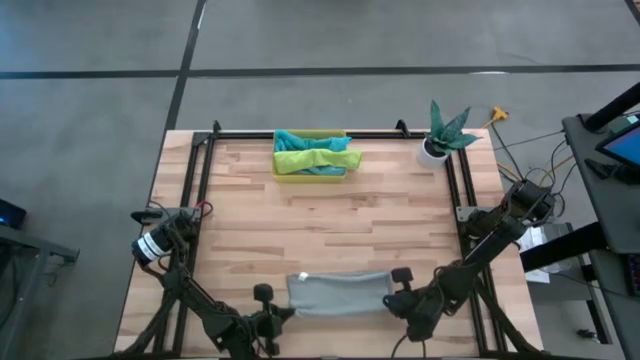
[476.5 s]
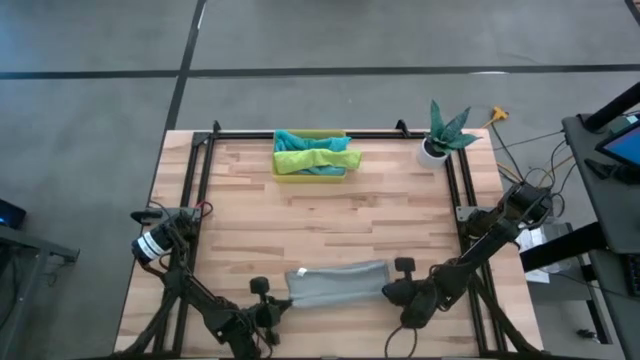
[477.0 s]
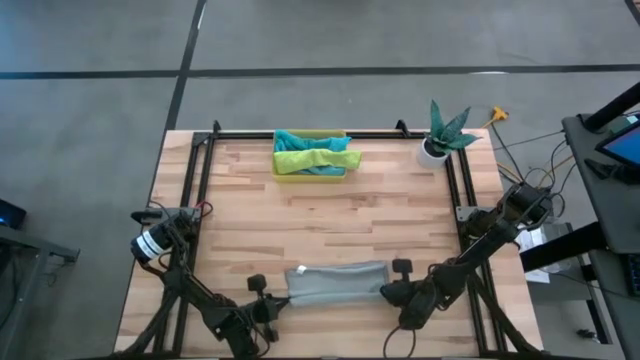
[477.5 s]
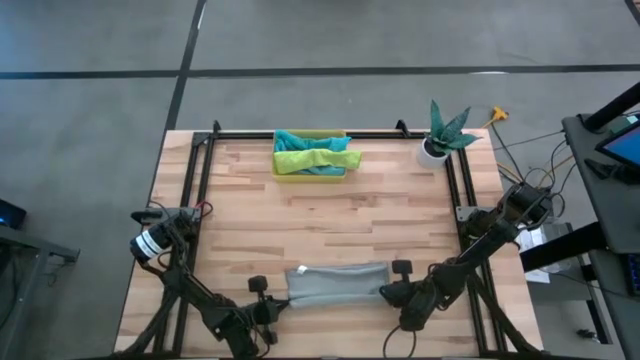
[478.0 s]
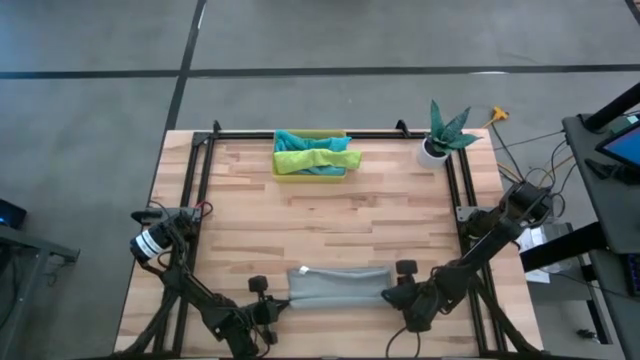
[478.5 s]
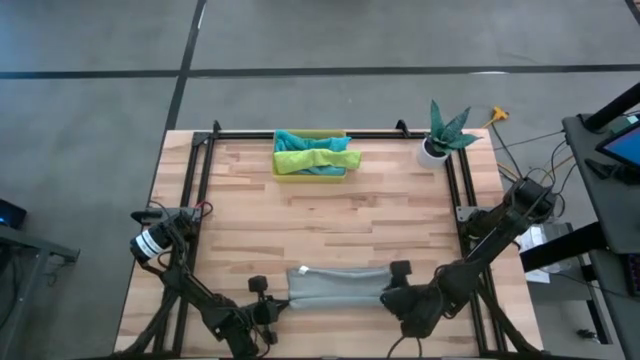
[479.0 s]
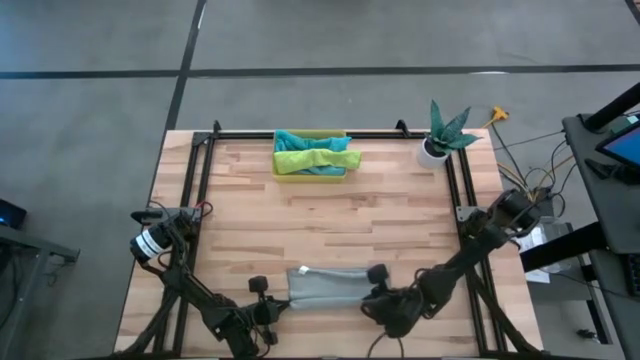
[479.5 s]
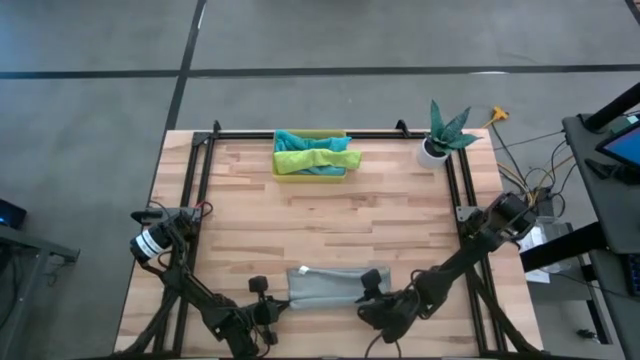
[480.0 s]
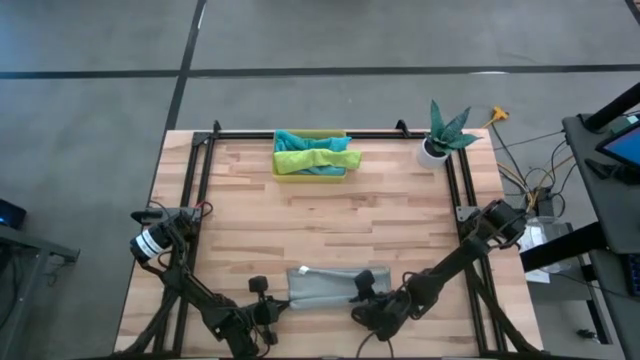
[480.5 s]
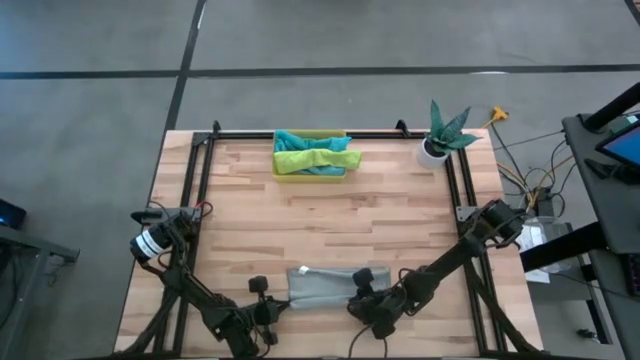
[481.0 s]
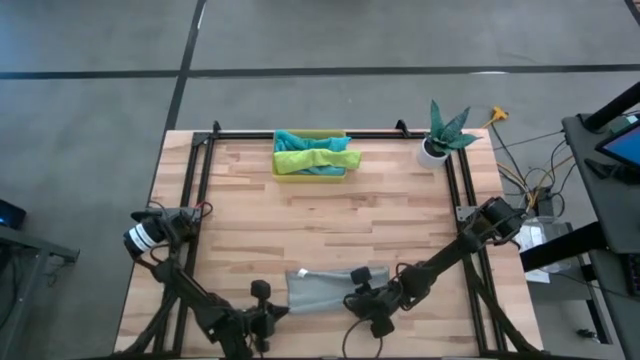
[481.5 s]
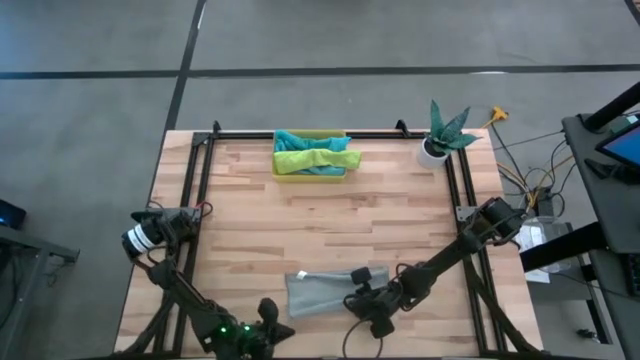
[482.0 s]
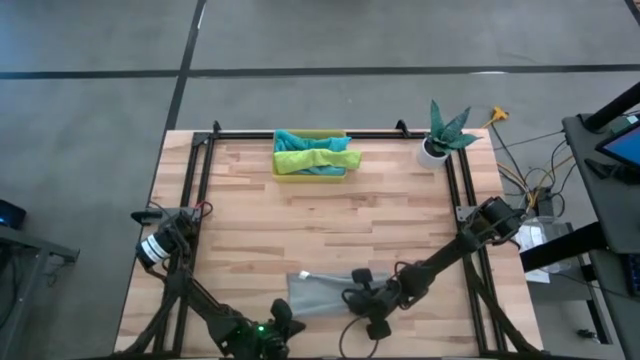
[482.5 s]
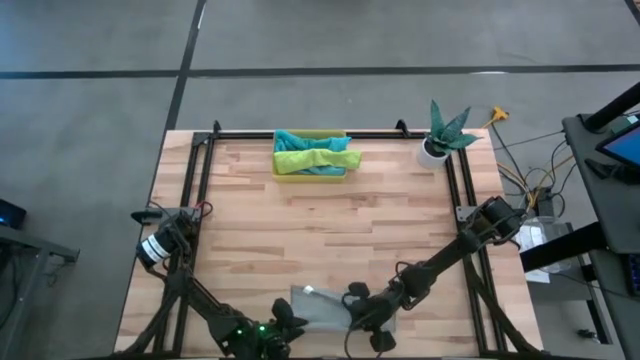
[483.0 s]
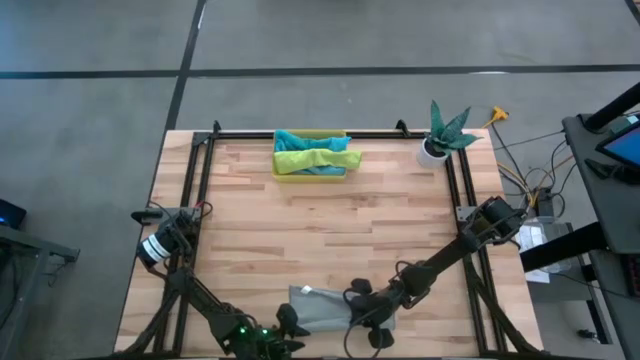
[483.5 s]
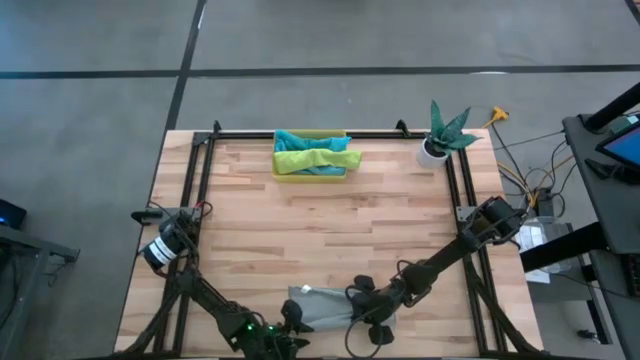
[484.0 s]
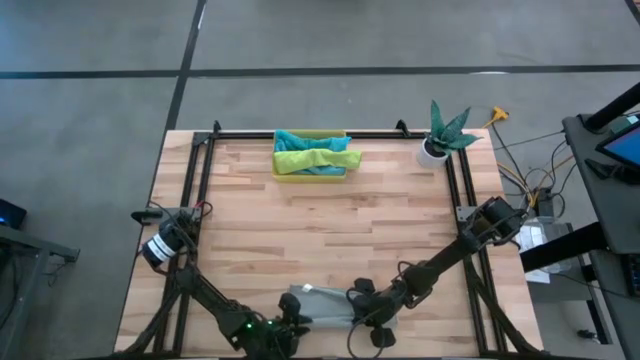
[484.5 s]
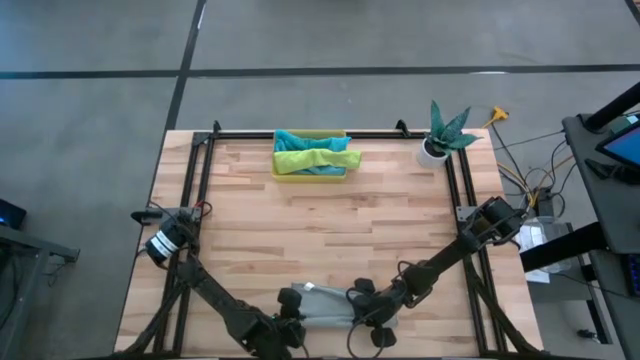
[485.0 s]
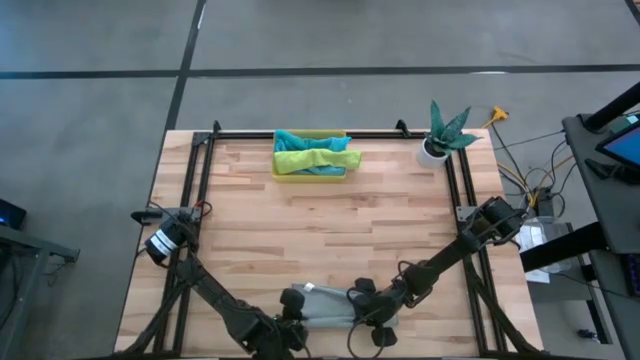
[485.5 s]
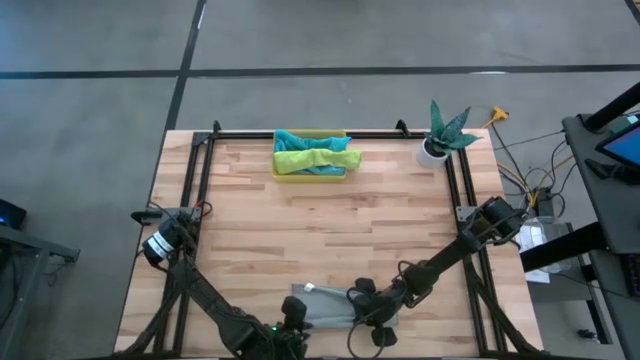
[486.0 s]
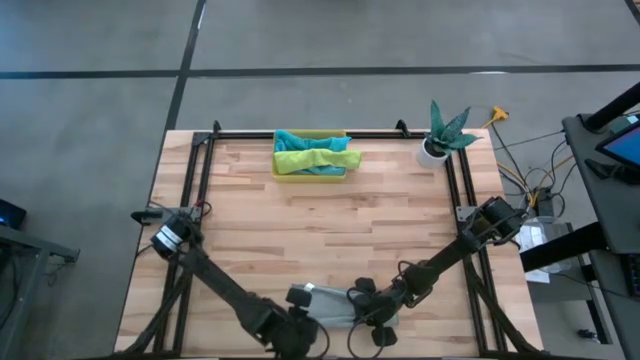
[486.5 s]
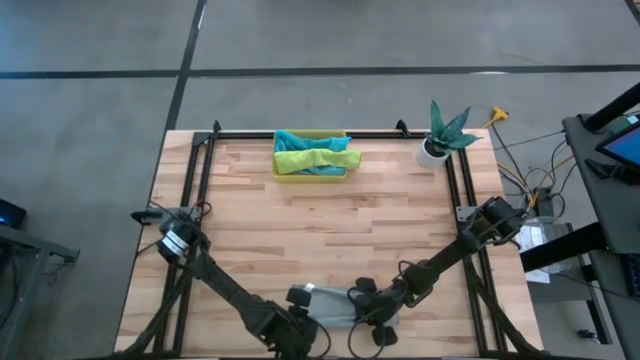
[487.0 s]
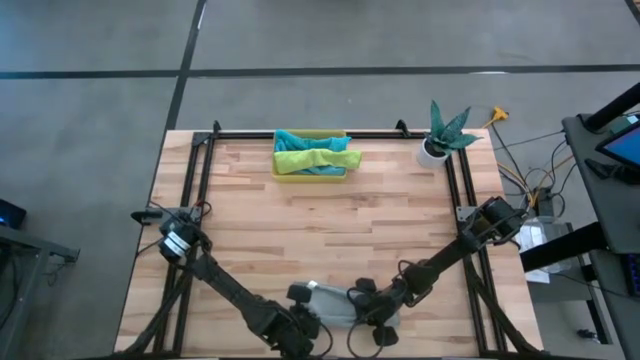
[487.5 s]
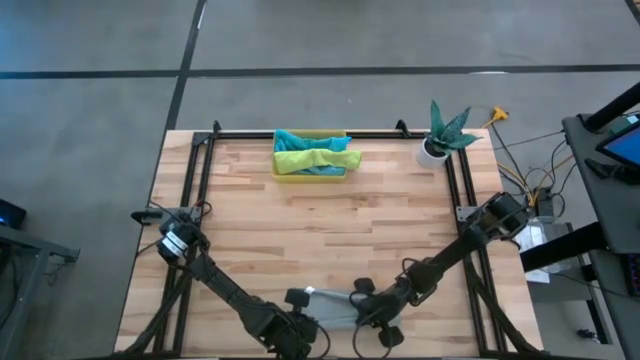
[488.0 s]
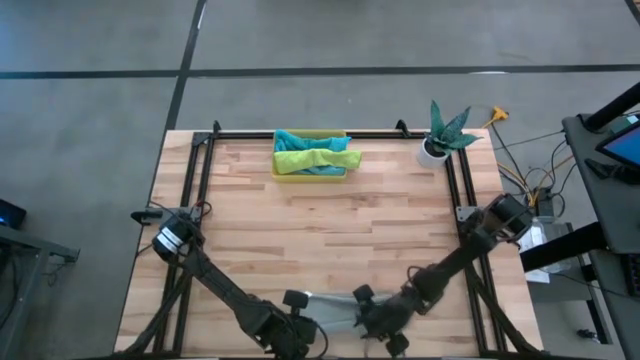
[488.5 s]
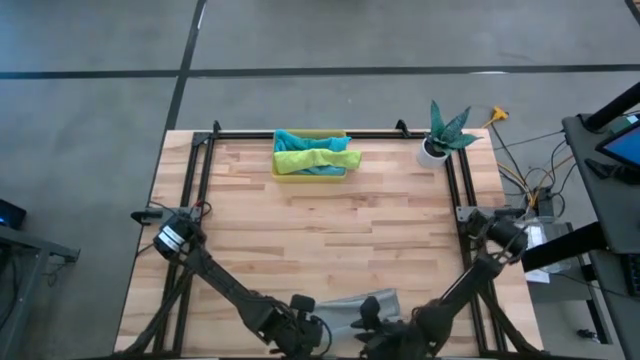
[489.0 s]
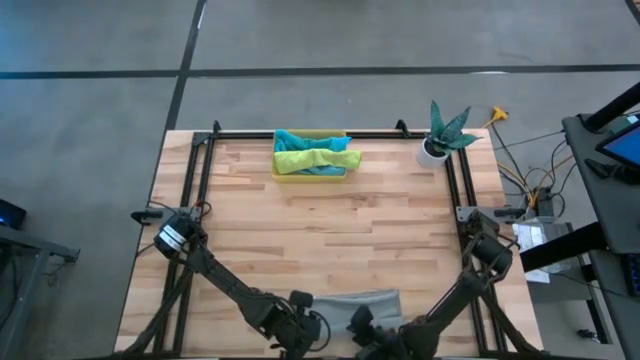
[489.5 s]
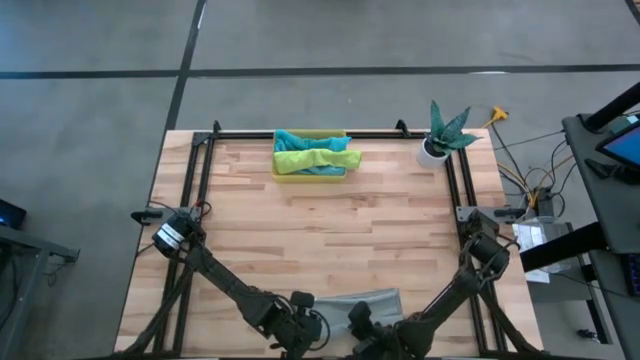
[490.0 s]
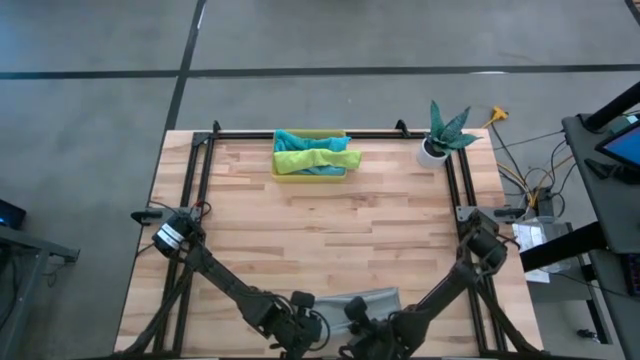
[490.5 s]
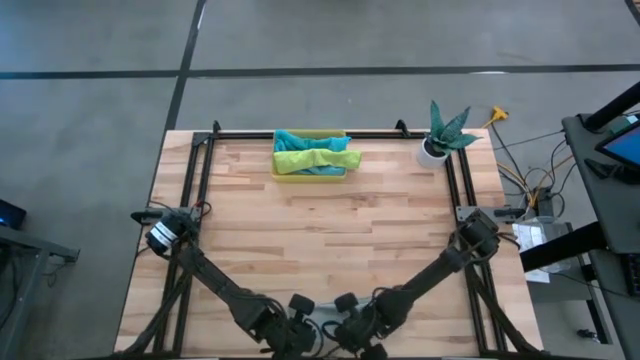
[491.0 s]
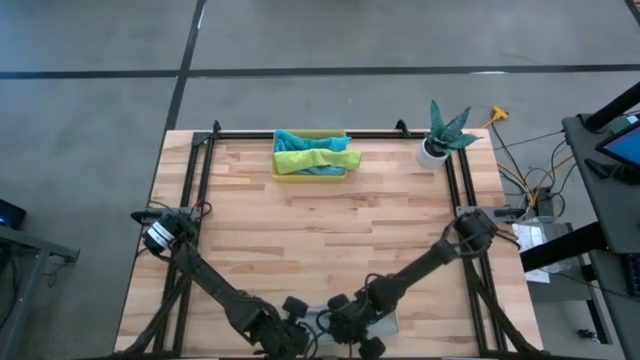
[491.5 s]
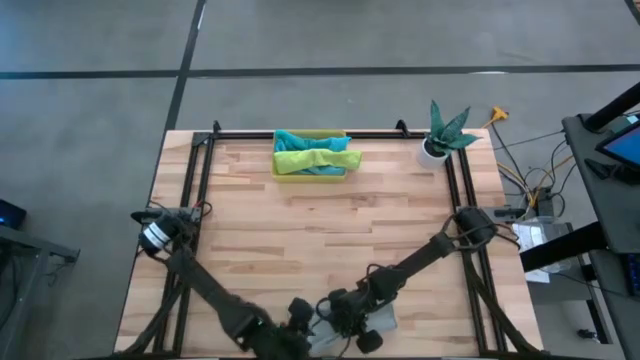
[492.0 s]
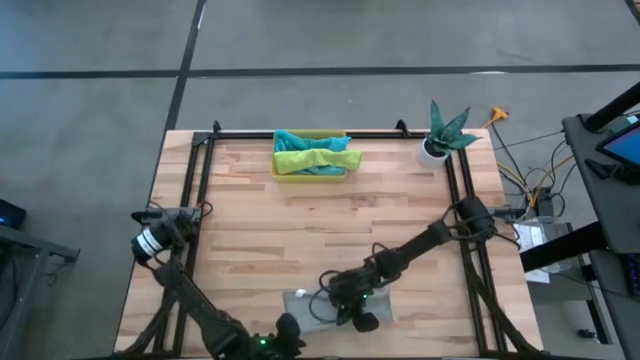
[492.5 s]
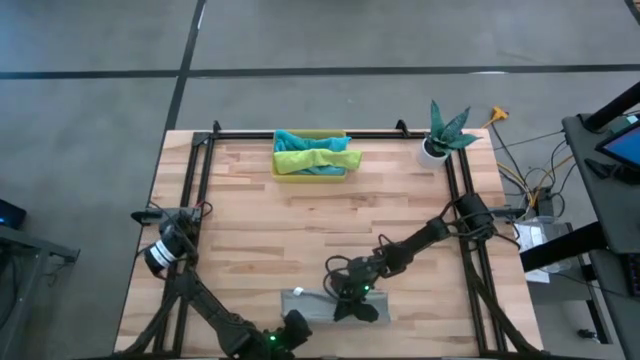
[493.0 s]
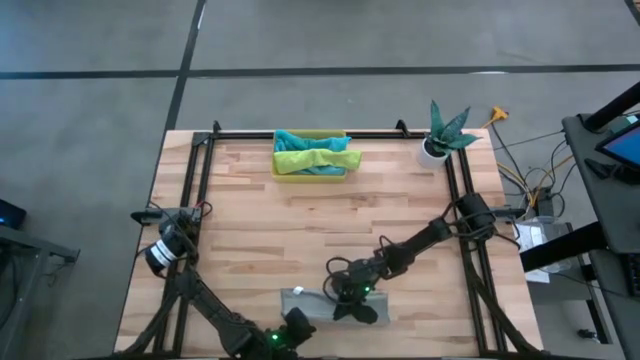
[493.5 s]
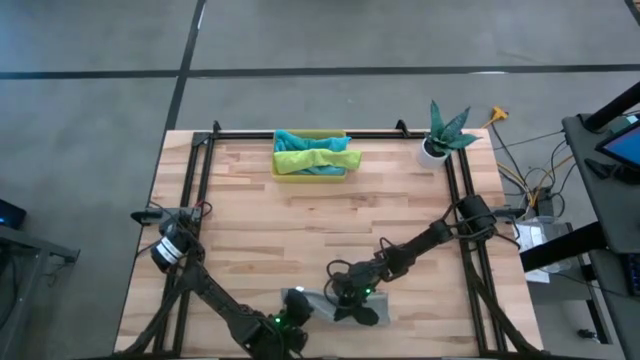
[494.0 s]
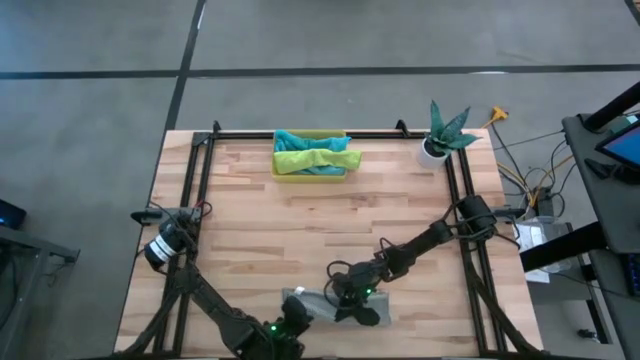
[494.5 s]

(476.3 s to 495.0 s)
Task: Roll microfiber towels into tight, uniform cylinder then place into a basket
Roll the gray towel
